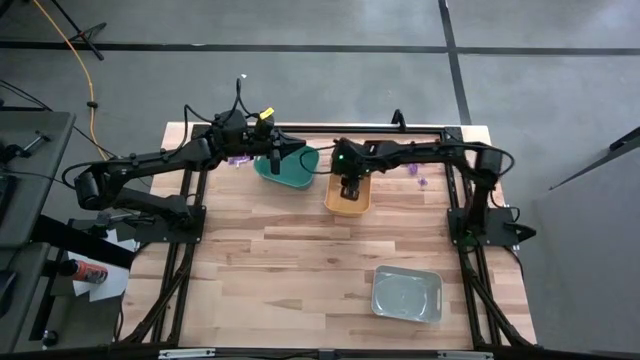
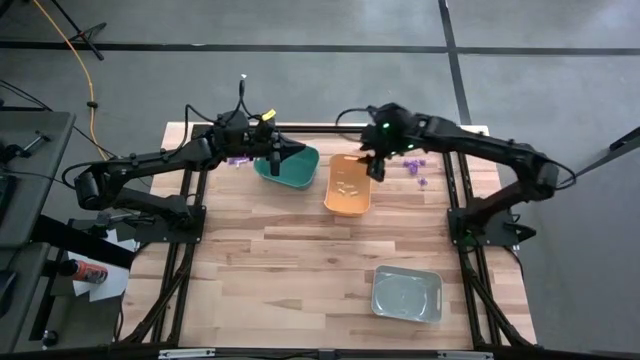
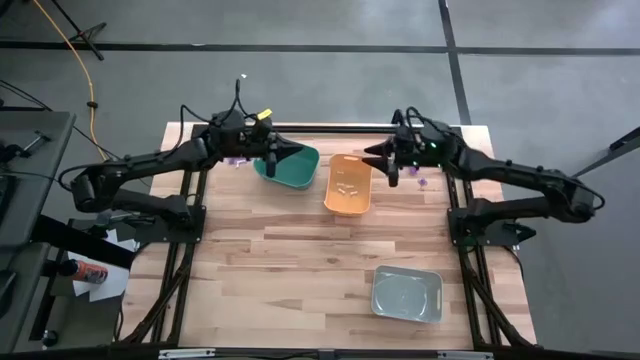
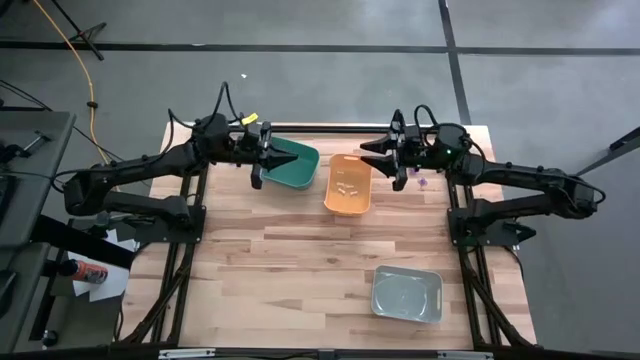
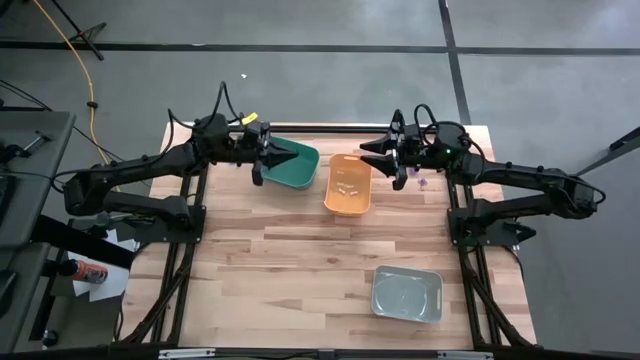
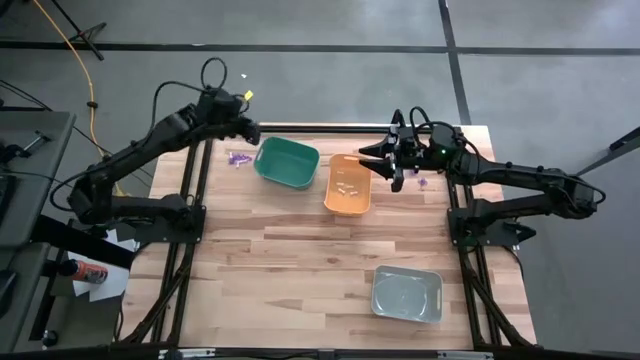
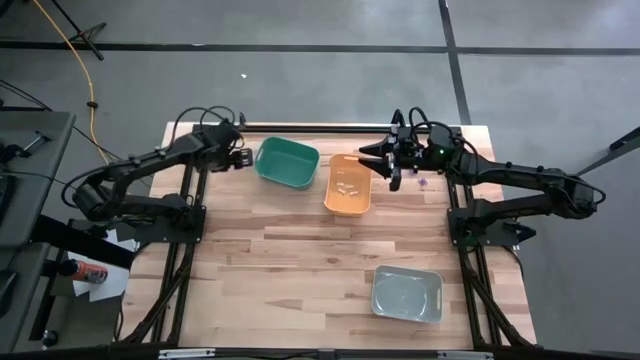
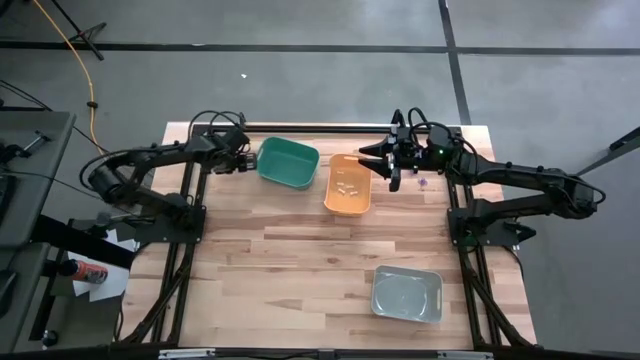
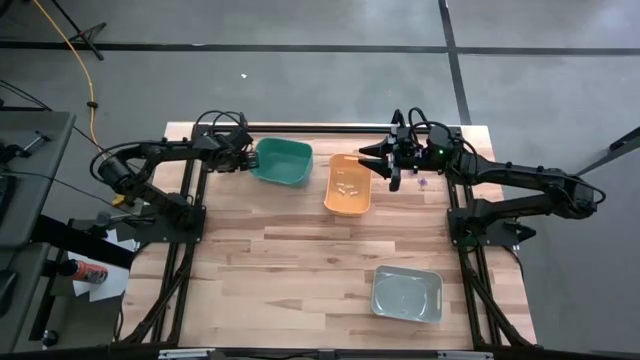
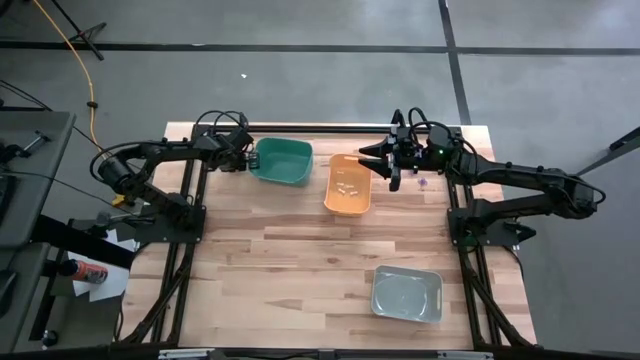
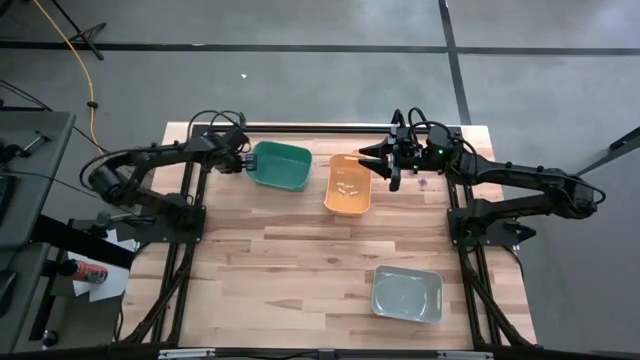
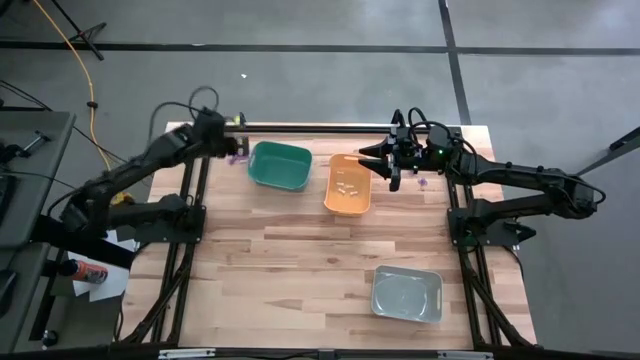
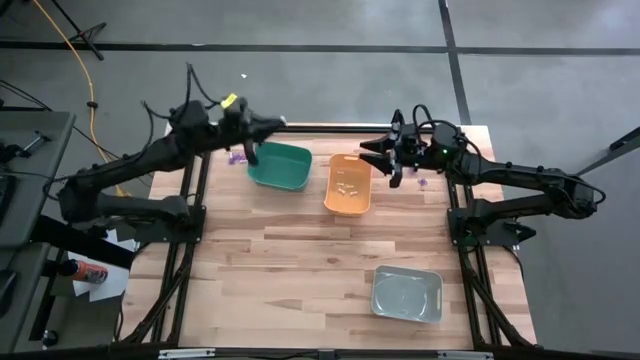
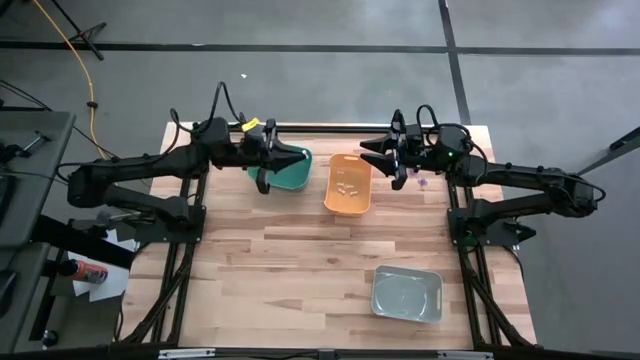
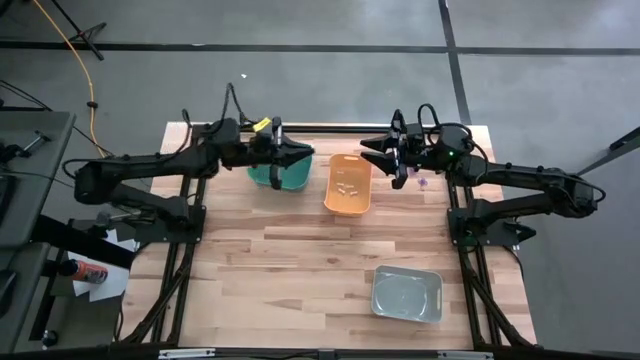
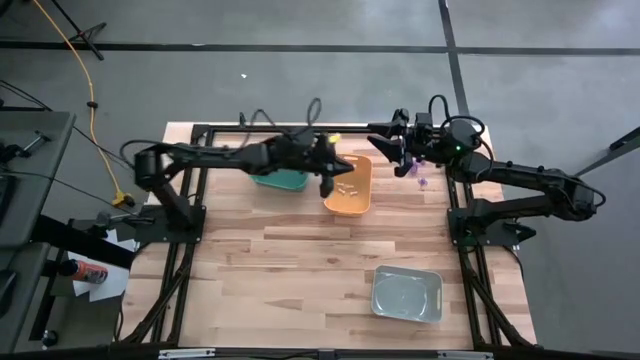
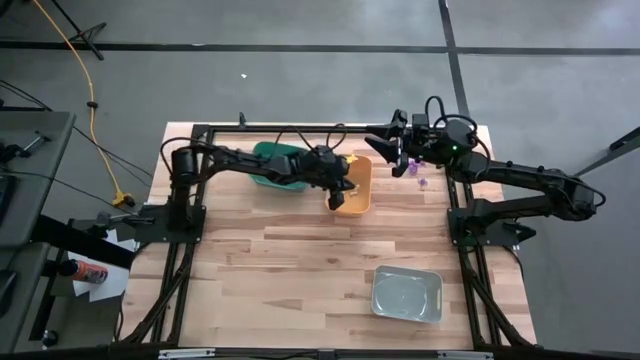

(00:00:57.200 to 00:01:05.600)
Task: Sort Halloween decoration
Put the white bone toy into the yellow bin

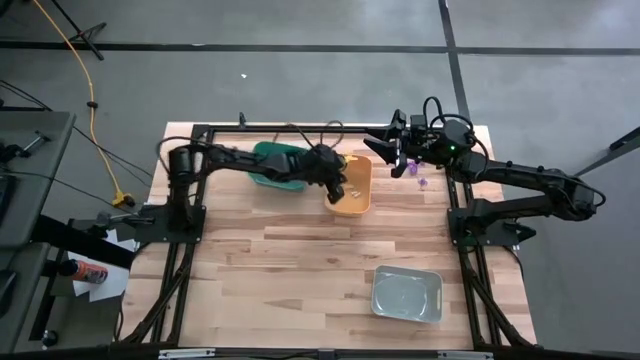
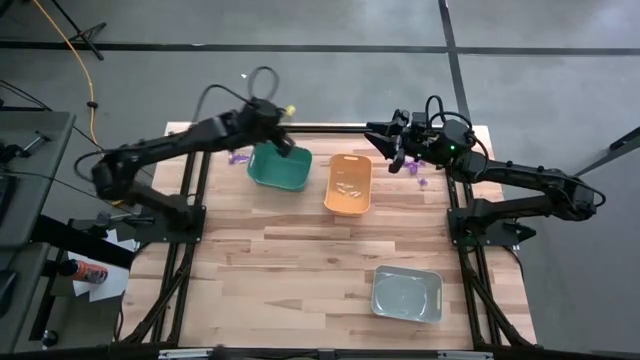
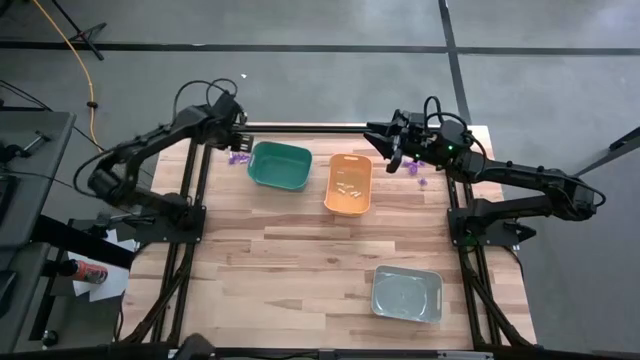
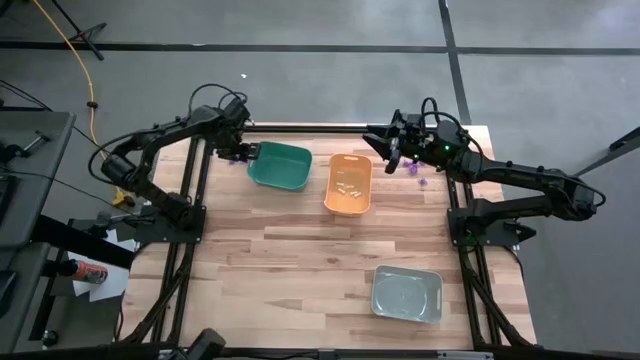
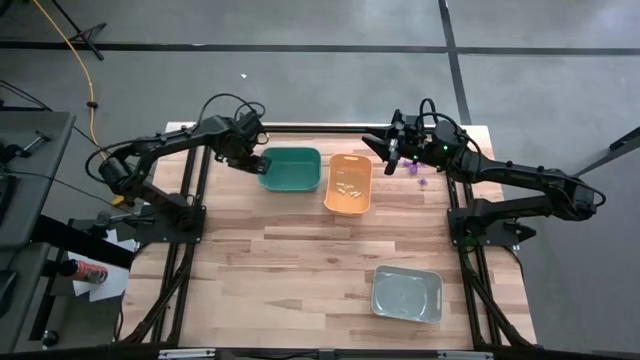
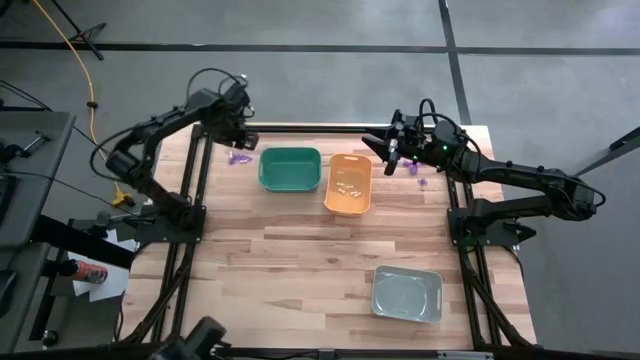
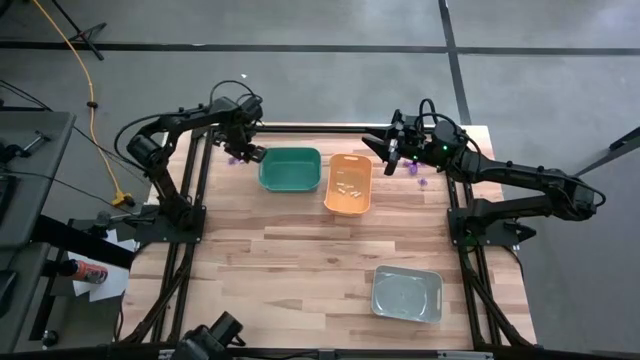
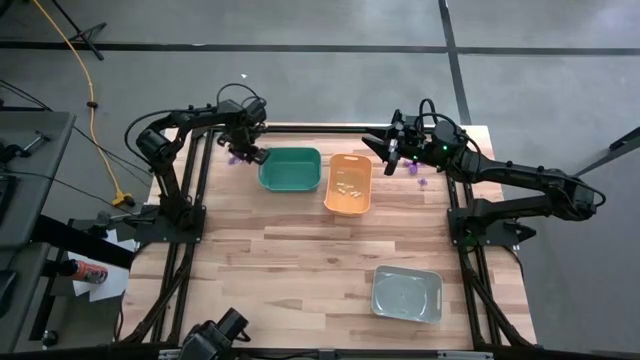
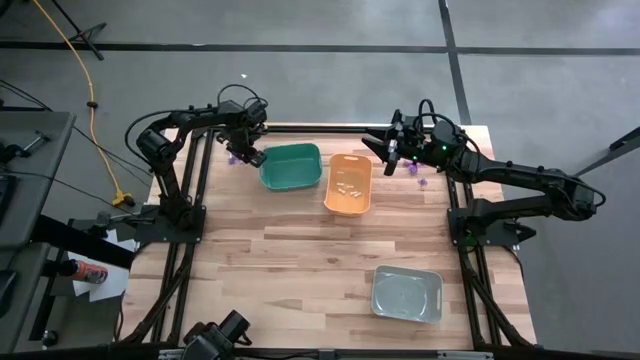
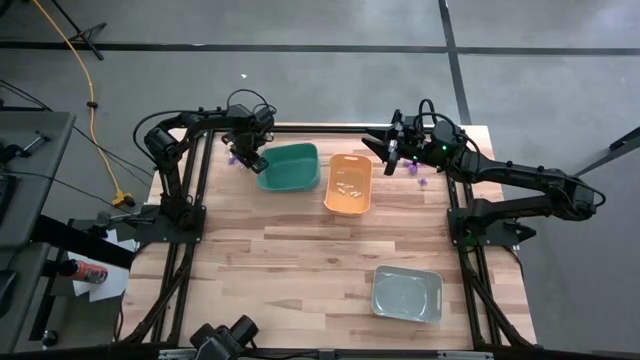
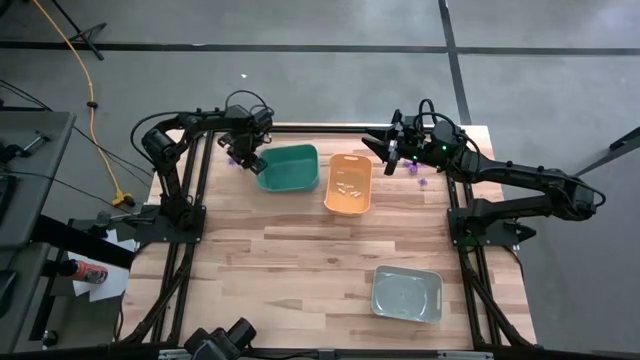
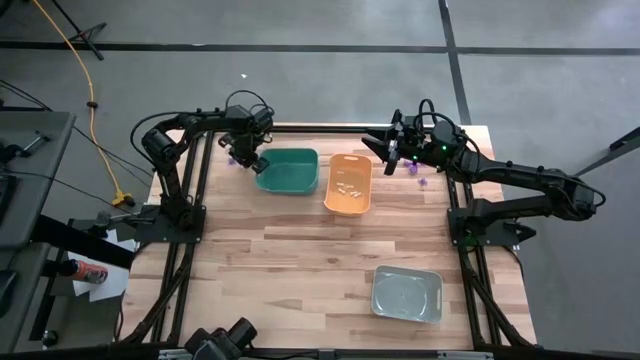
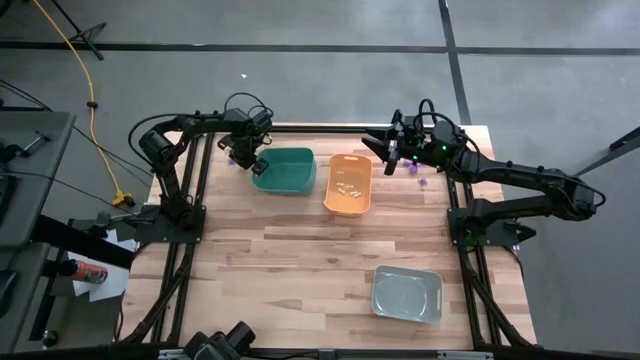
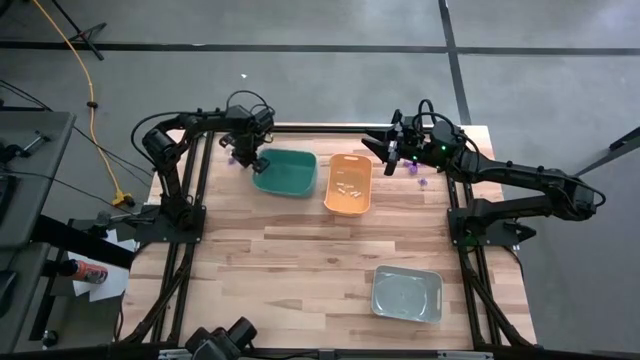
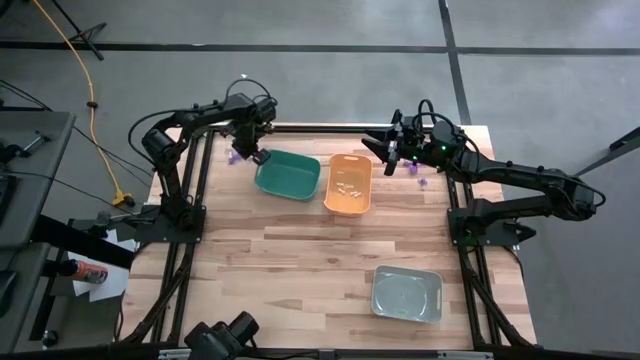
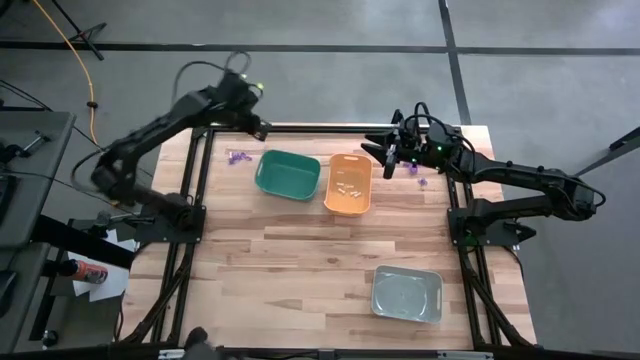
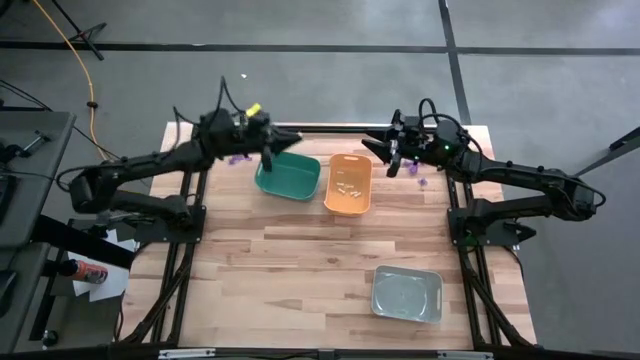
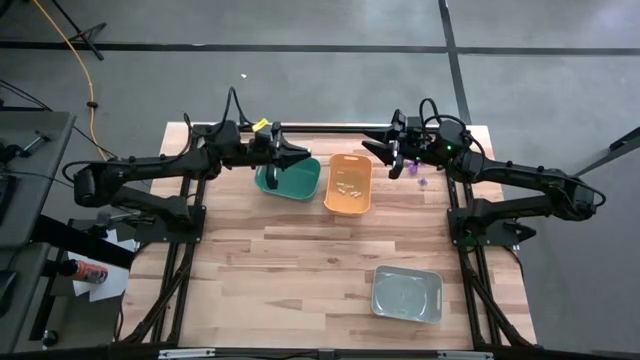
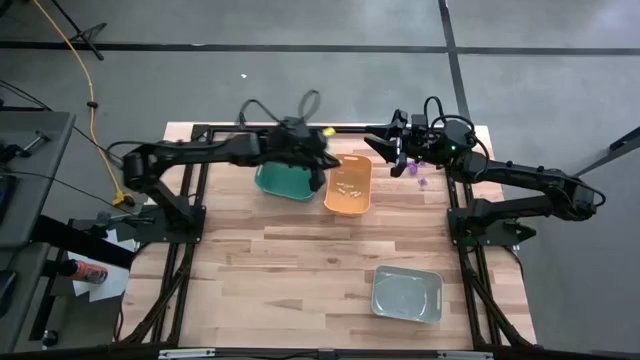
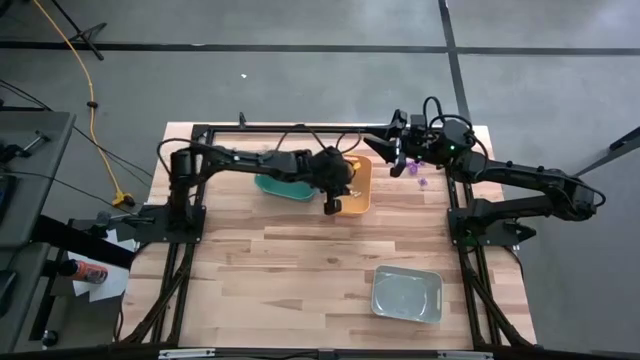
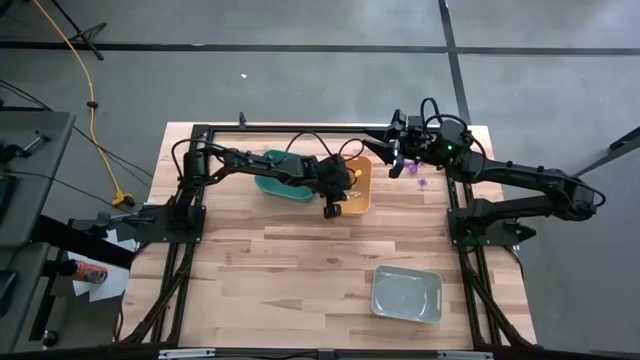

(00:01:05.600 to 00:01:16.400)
Put the white bone toy into the yellow bin

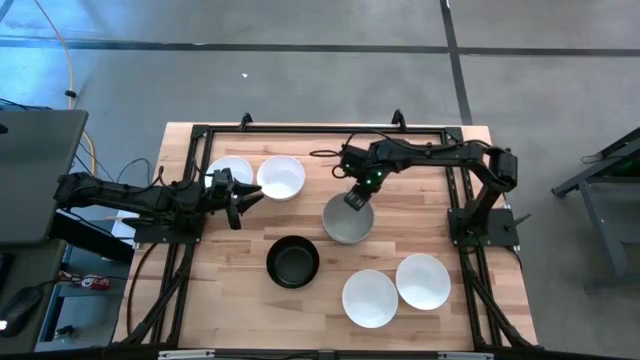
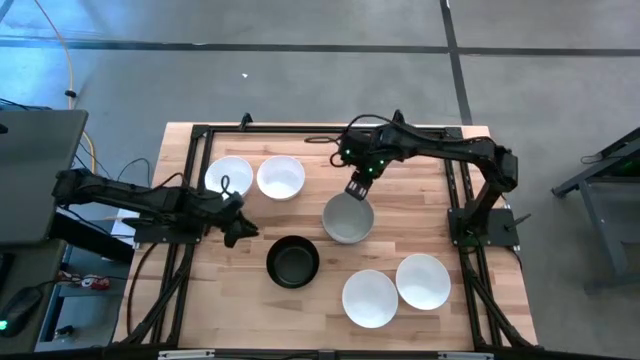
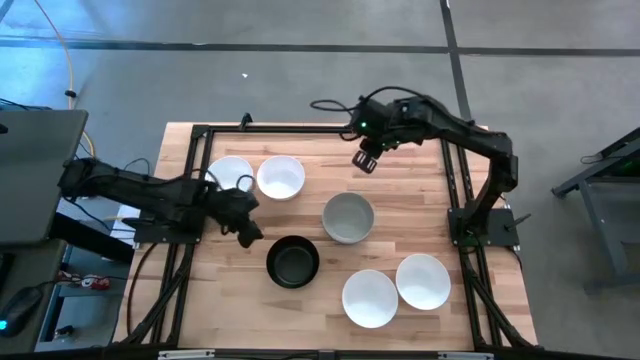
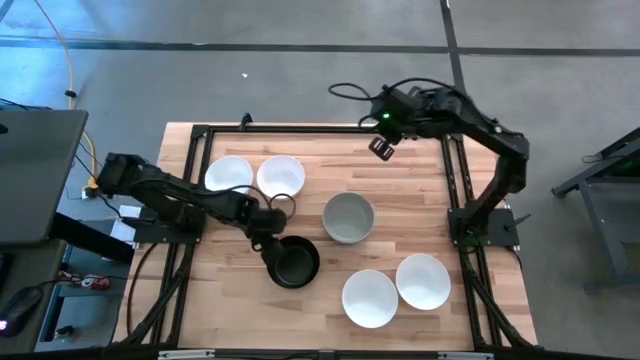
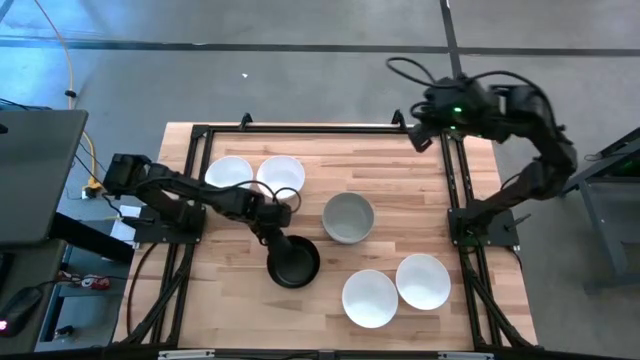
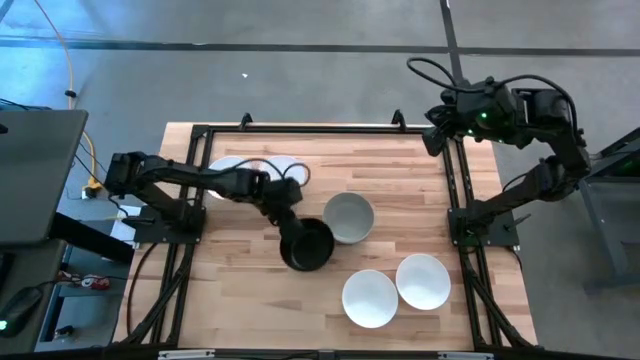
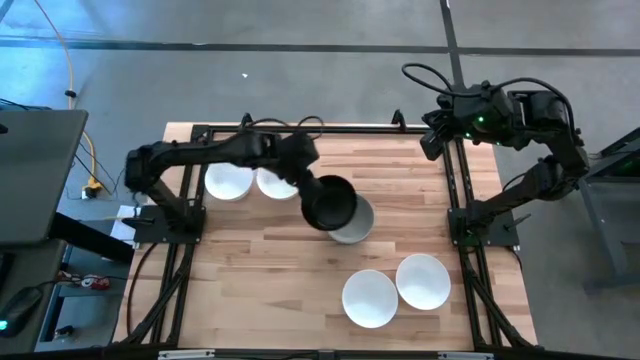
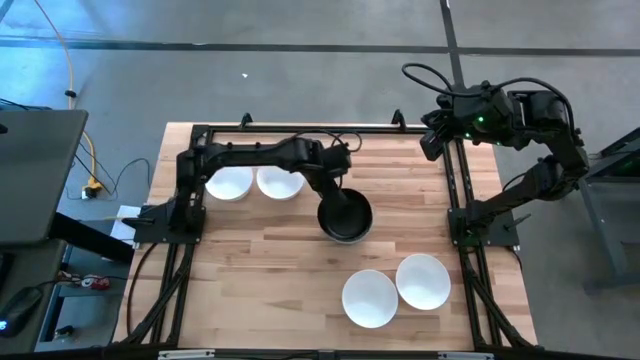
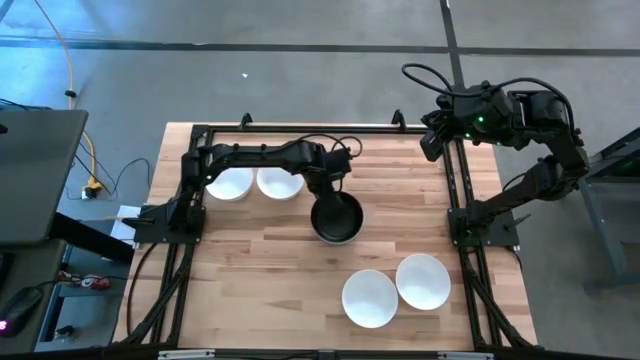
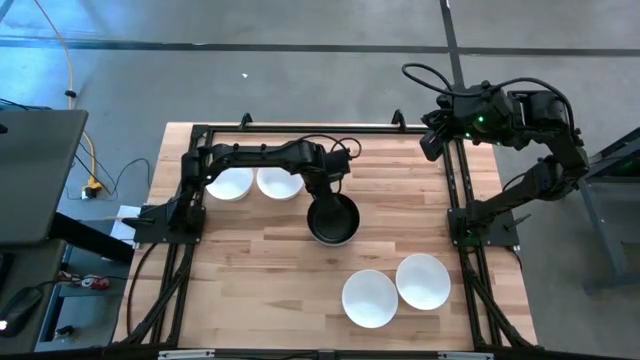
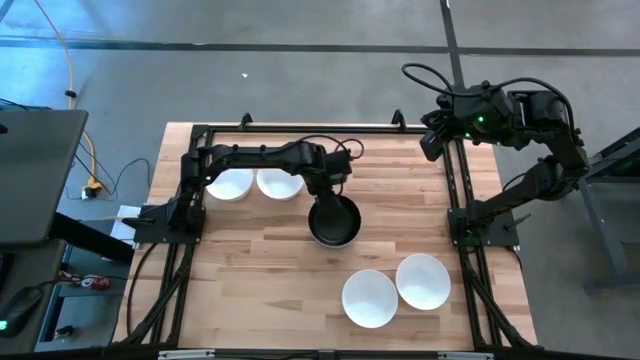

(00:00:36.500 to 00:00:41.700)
Task: Nest bowls inside each other
Stack the black bowl on top of the gray bowl
